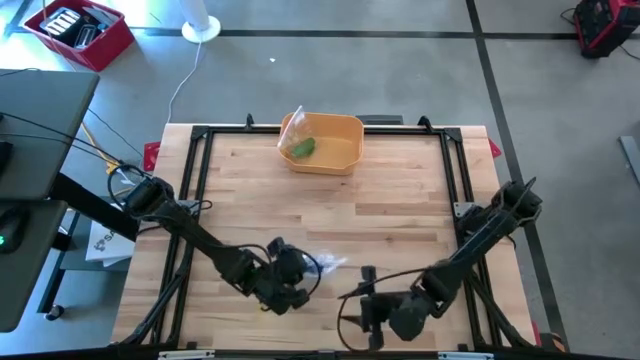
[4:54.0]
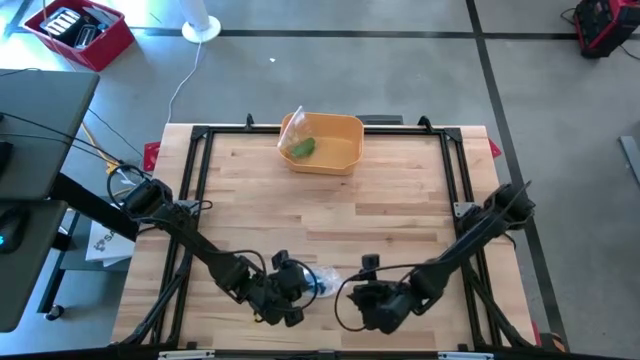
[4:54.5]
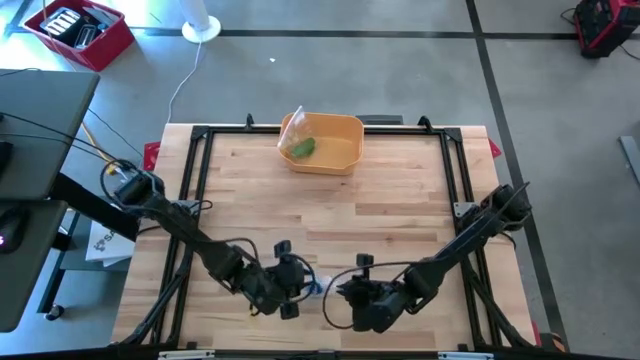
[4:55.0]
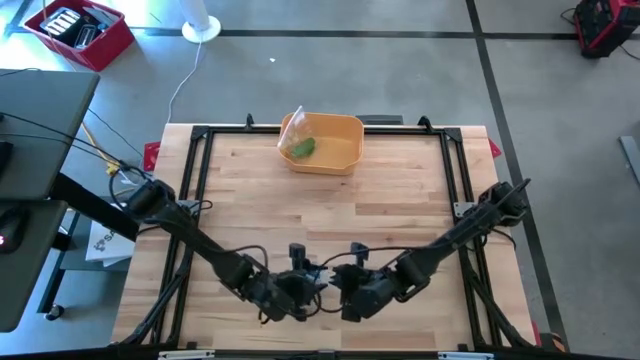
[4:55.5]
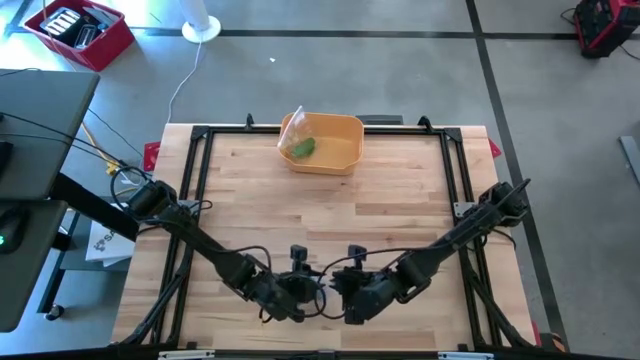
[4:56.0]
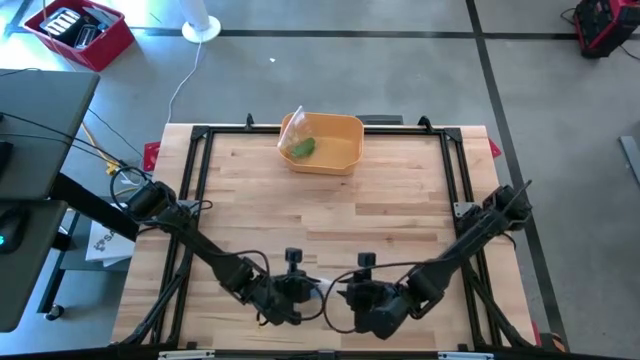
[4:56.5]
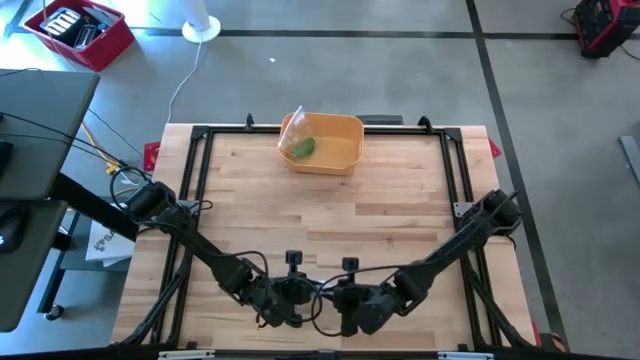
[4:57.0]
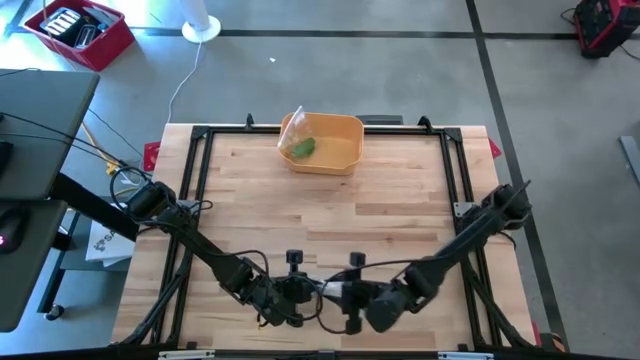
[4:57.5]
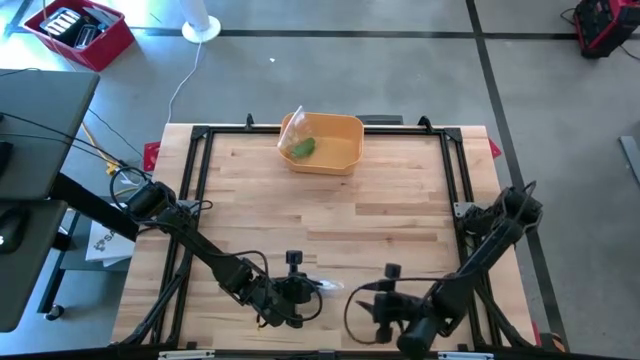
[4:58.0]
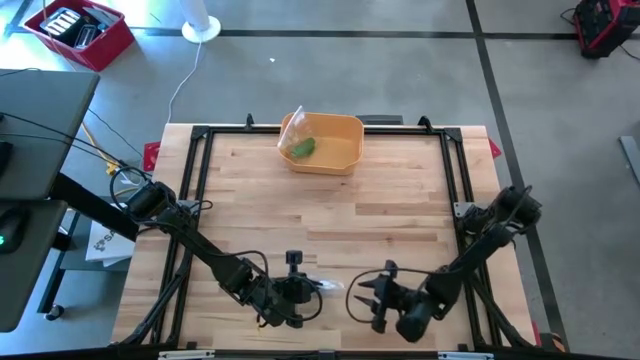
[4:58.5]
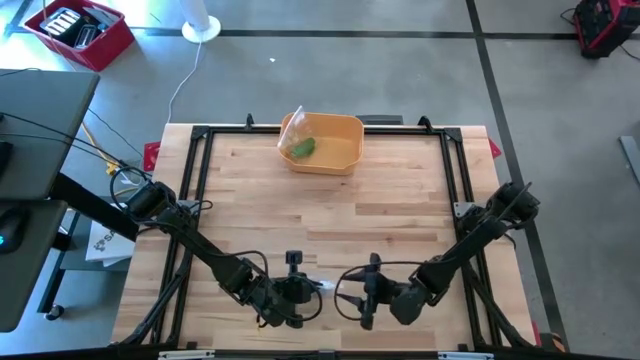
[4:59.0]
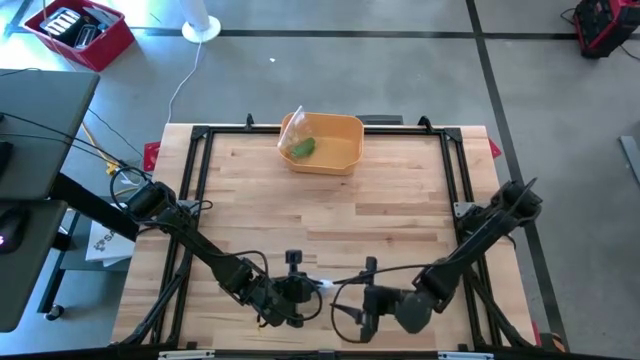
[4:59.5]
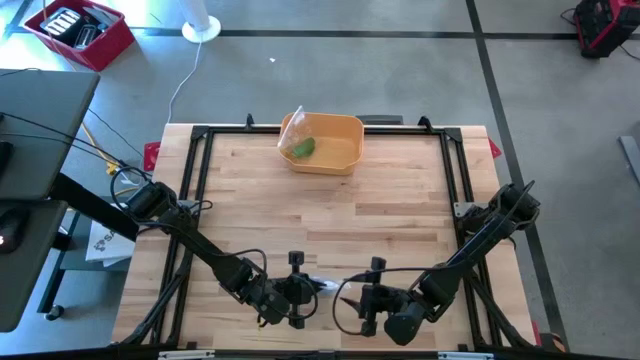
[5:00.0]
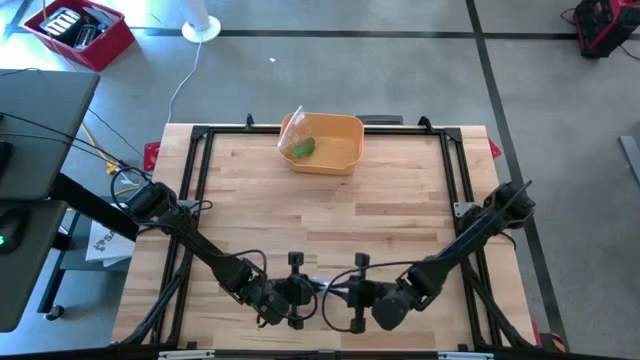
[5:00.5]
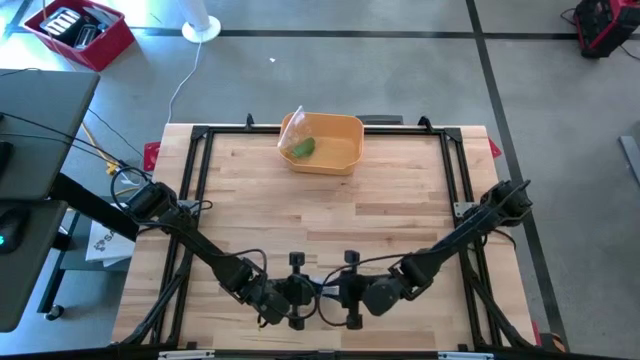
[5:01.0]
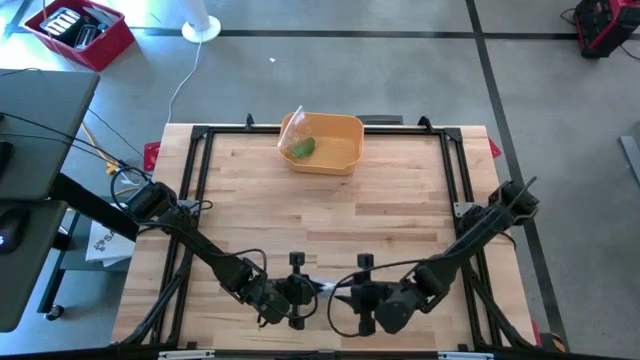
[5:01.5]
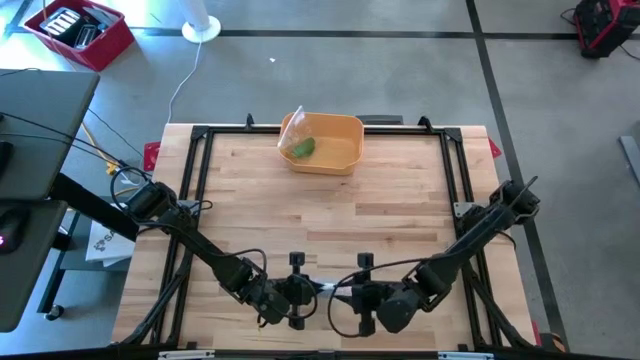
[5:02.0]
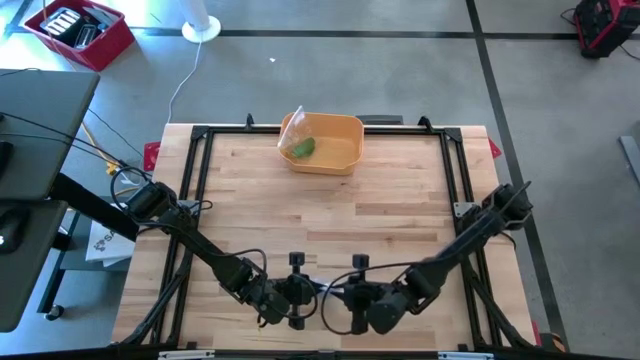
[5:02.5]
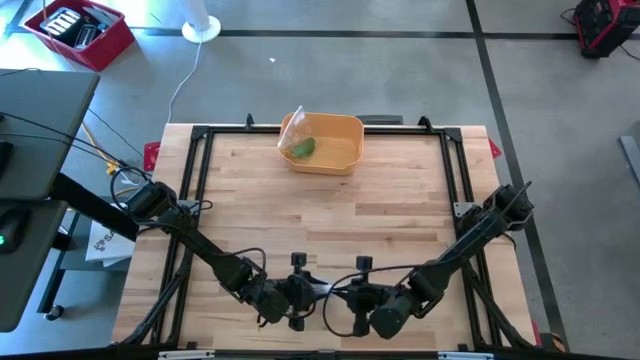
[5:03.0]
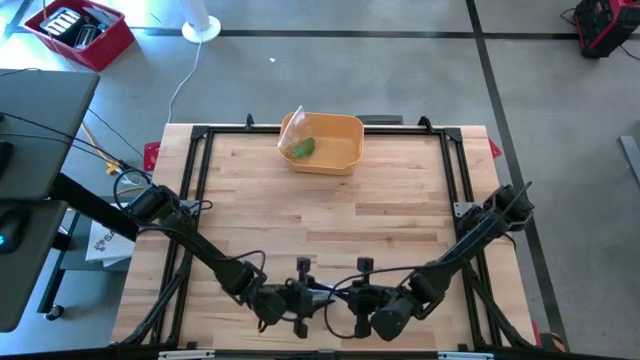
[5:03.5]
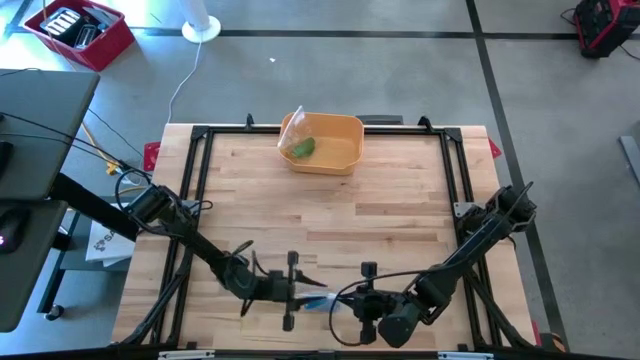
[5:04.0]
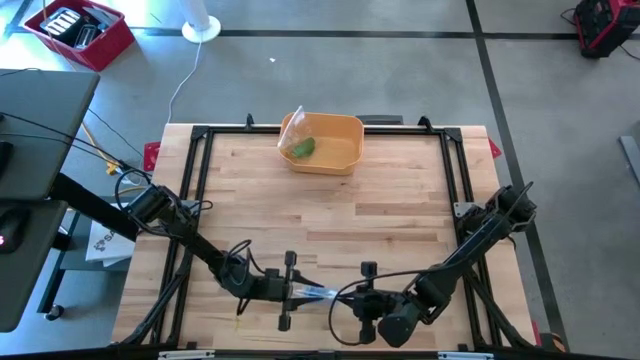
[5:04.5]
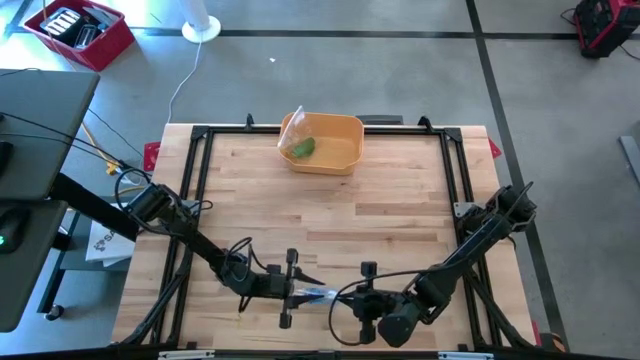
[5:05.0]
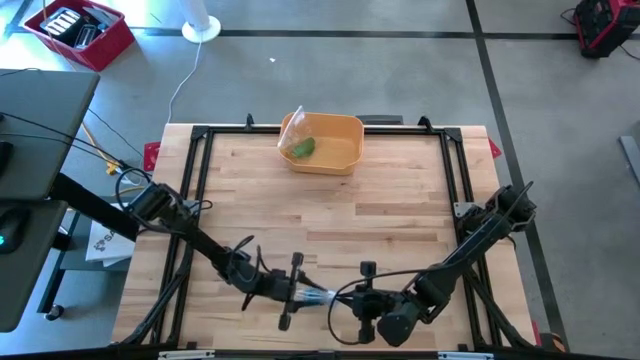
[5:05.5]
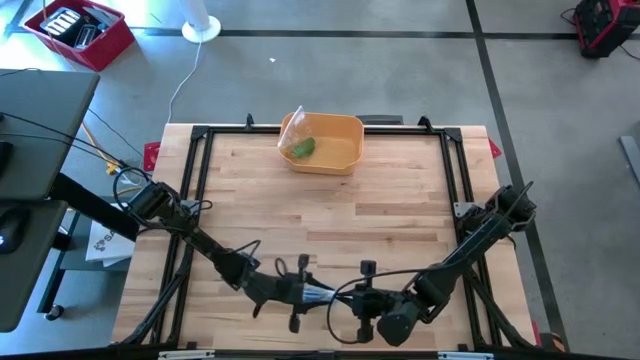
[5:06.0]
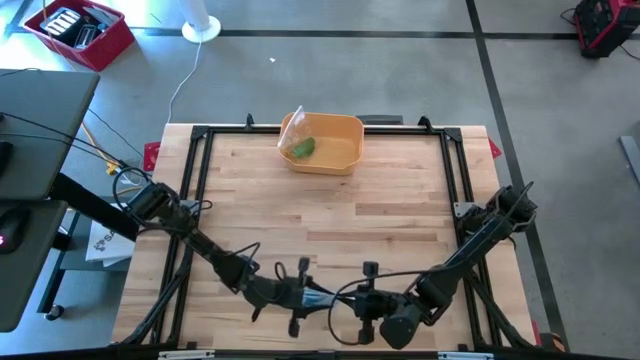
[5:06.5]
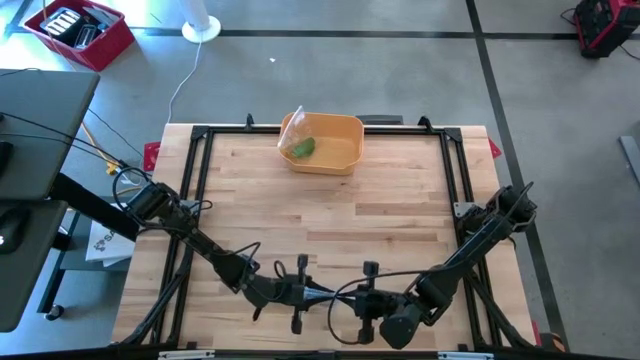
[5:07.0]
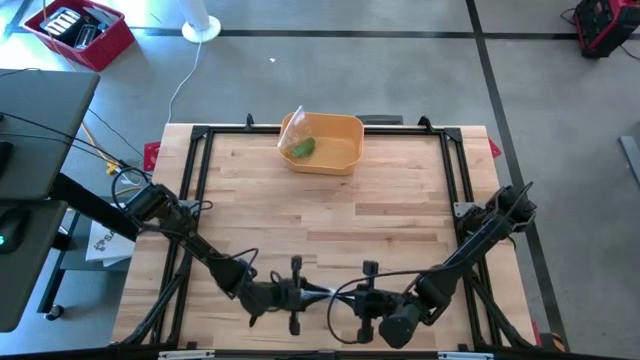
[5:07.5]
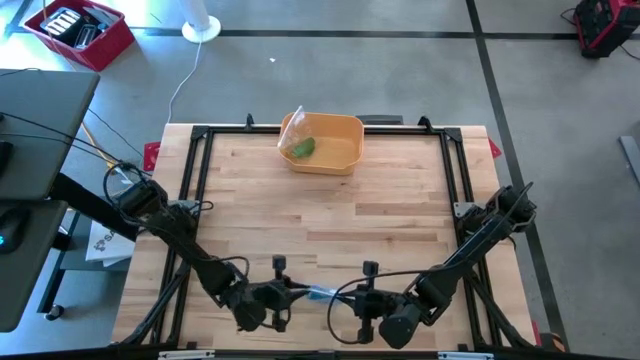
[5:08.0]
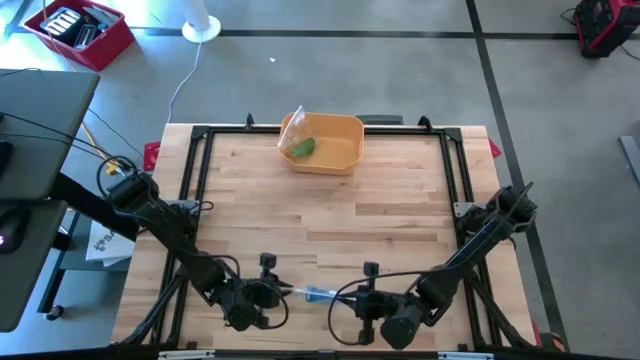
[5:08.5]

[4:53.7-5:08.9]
Task: Roll bandage
Close the transparent zip bag

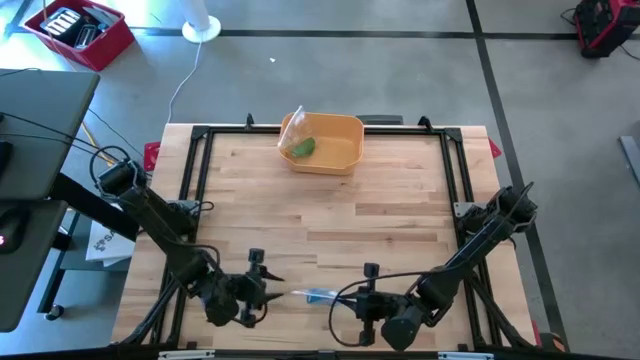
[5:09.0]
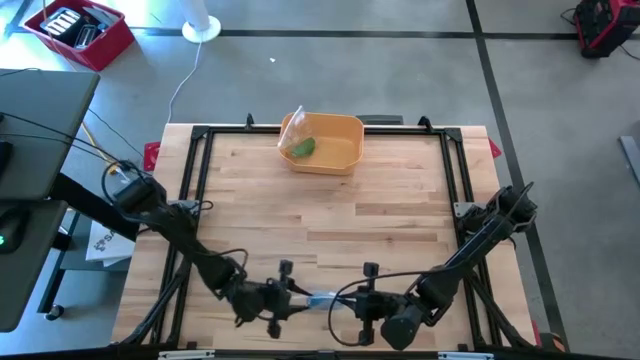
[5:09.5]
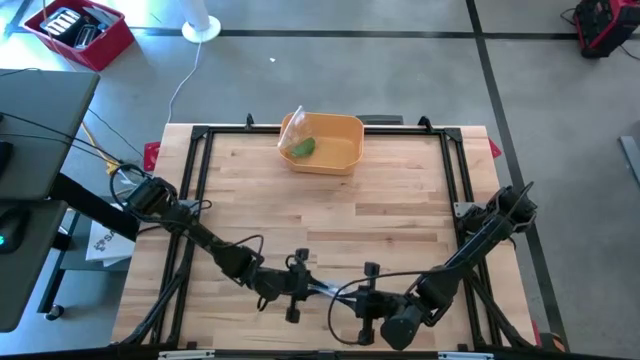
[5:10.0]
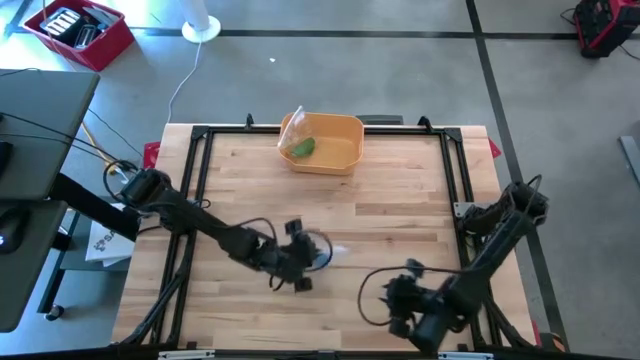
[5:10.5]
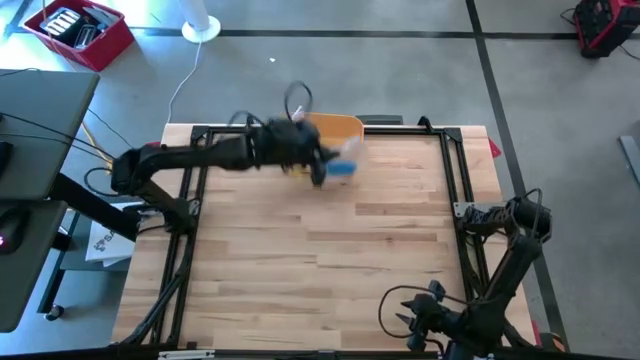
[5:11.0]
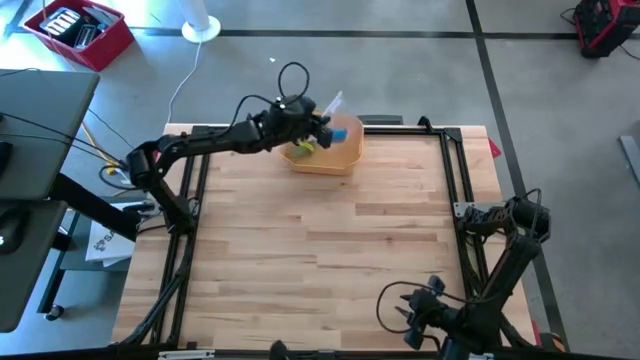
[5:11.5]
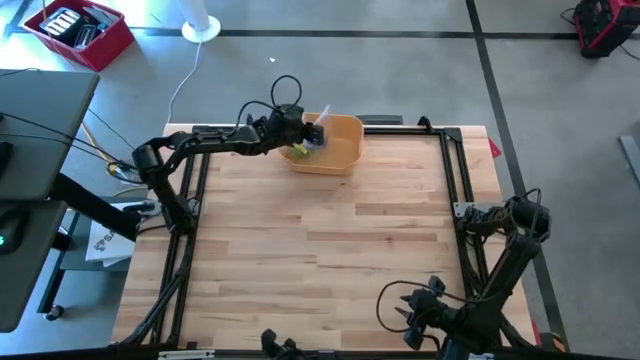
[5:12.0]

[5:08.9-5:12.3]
Put the zip bag into the yellow bin

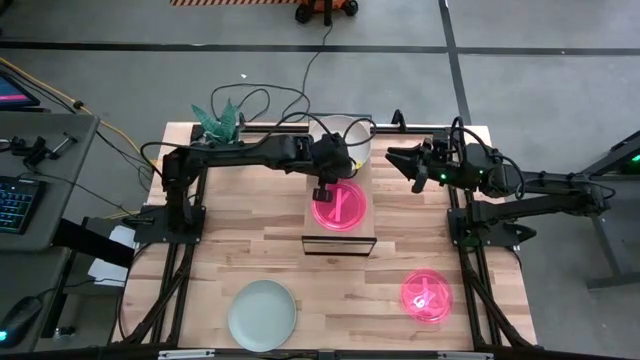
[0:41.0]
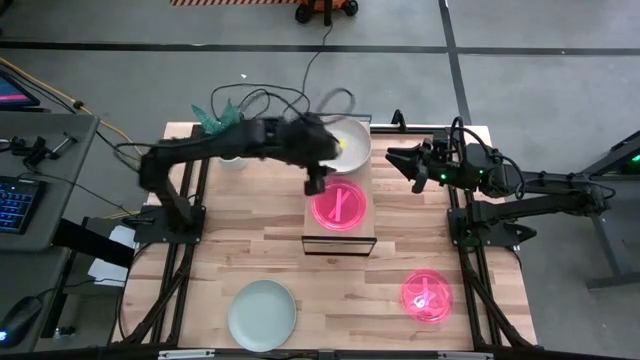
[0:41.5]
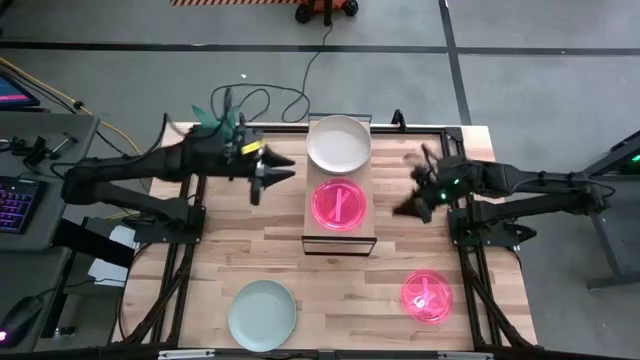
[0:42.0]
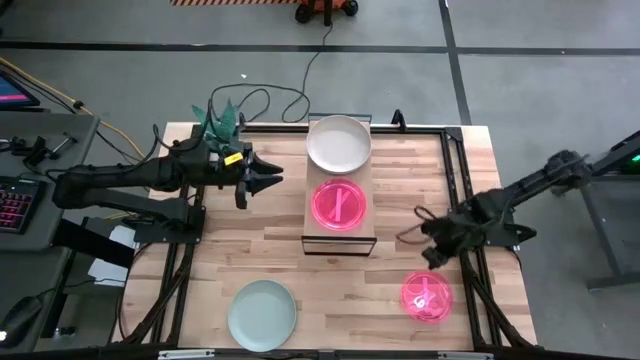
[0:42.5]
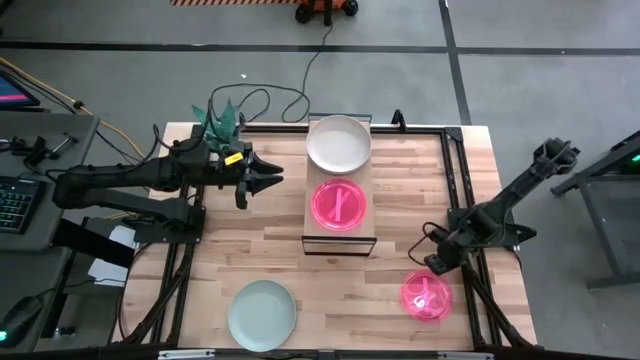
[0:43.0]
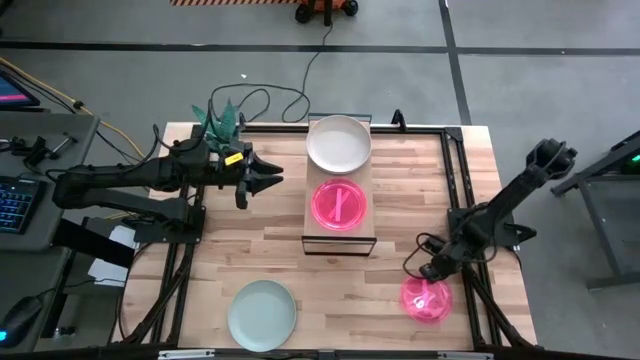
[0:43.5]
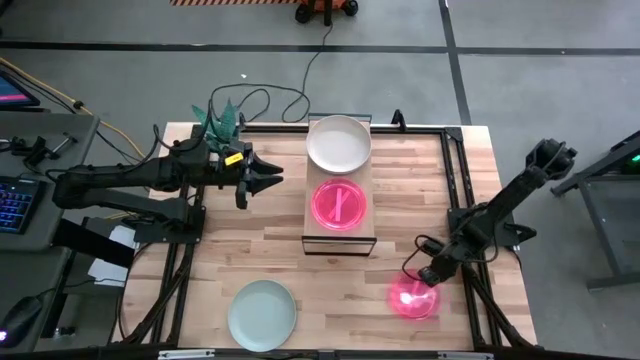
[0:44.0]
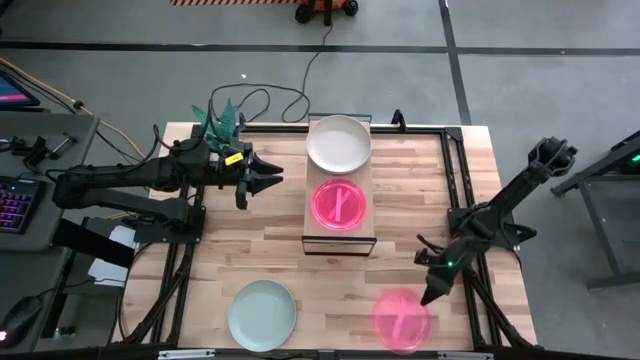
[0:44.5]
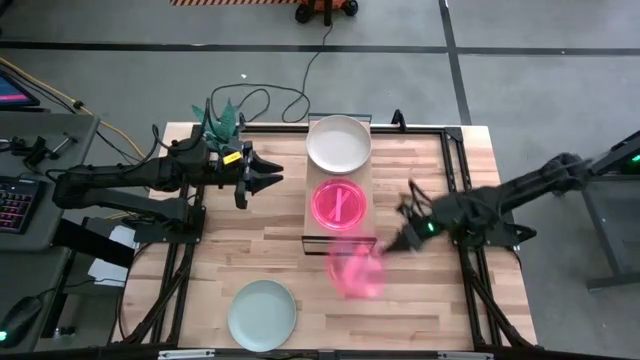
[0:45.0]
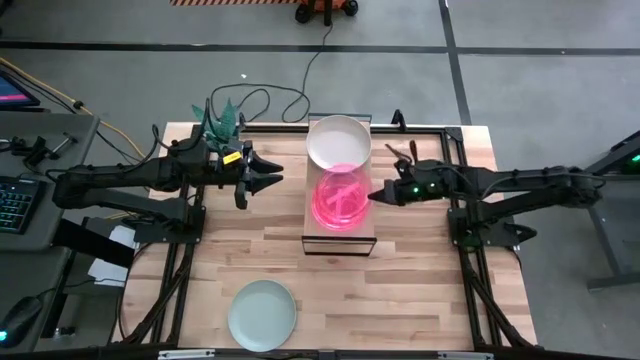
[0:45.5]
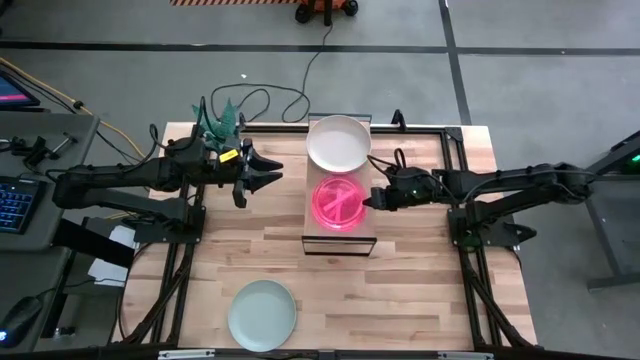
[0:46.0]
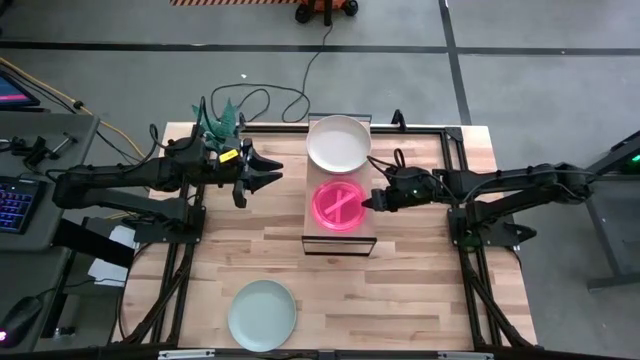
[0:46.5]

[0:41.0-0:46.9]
Task: Place and stack plates onto a shelf
Stack the pink plate on top of the stacked pink plates on the shelf
